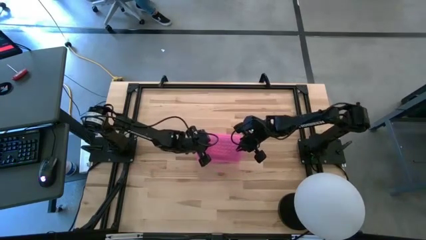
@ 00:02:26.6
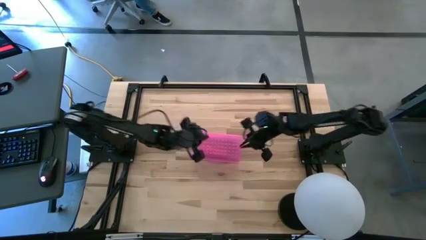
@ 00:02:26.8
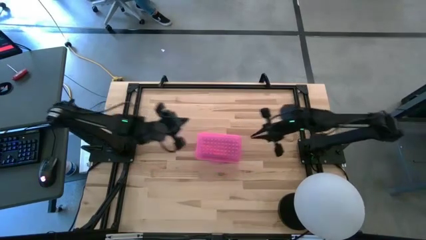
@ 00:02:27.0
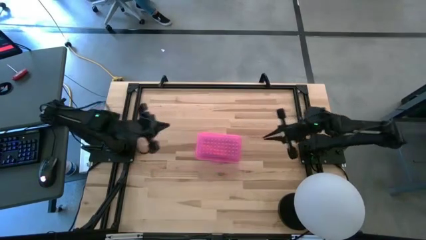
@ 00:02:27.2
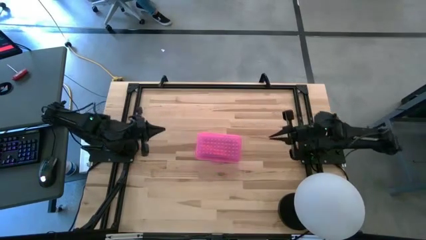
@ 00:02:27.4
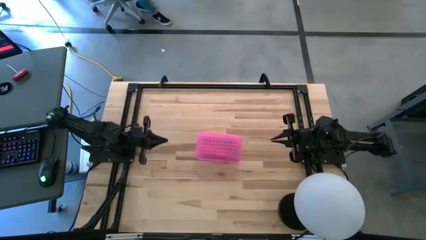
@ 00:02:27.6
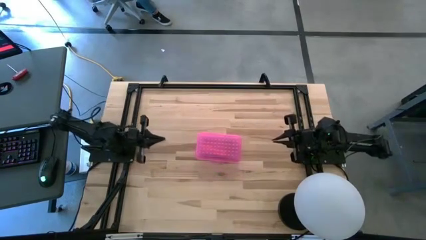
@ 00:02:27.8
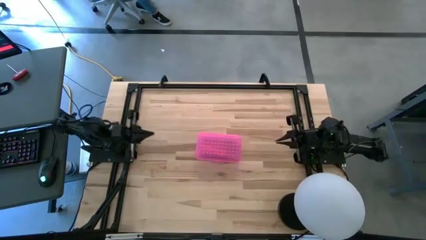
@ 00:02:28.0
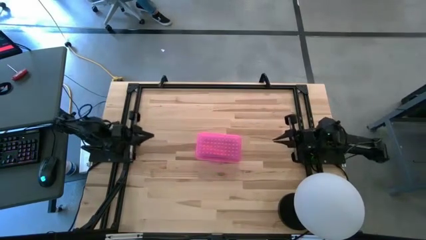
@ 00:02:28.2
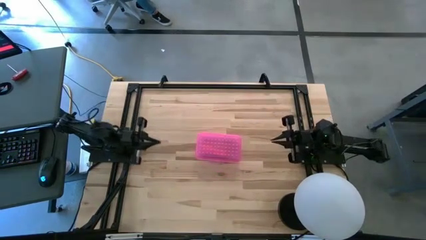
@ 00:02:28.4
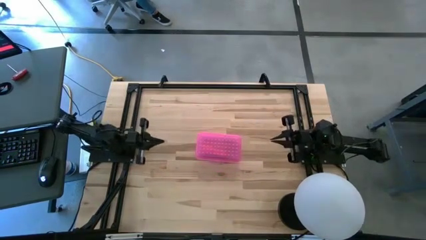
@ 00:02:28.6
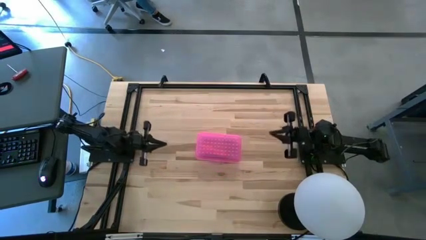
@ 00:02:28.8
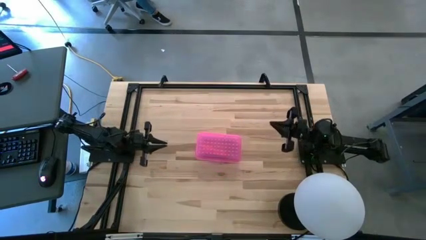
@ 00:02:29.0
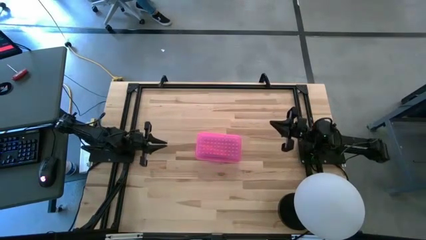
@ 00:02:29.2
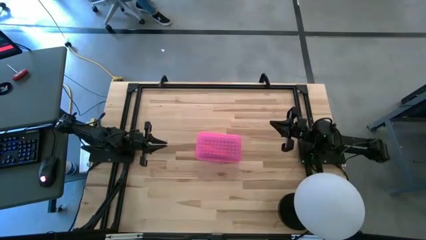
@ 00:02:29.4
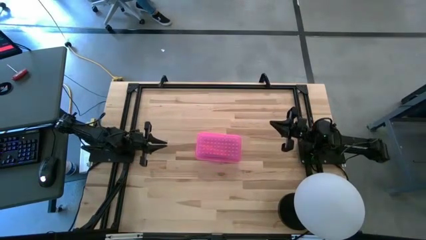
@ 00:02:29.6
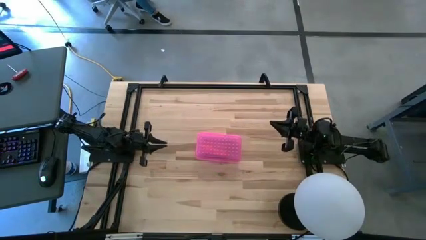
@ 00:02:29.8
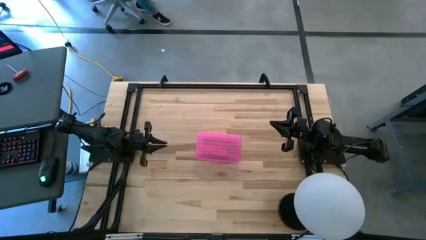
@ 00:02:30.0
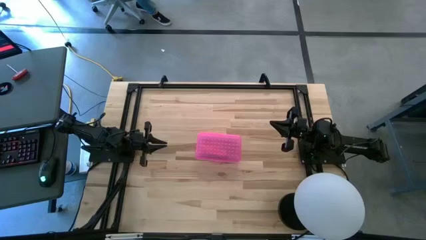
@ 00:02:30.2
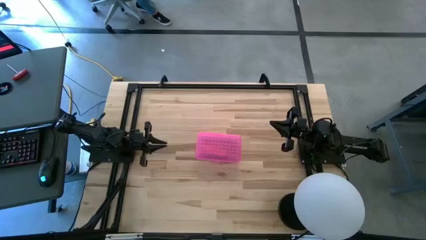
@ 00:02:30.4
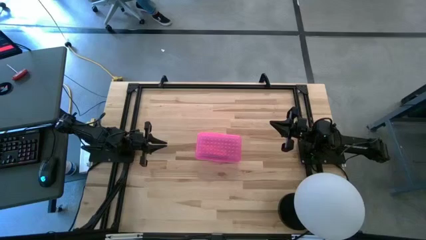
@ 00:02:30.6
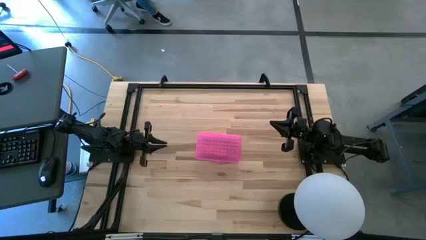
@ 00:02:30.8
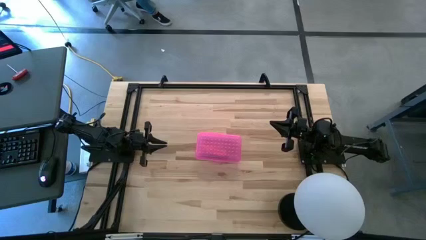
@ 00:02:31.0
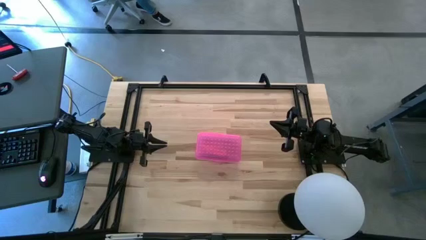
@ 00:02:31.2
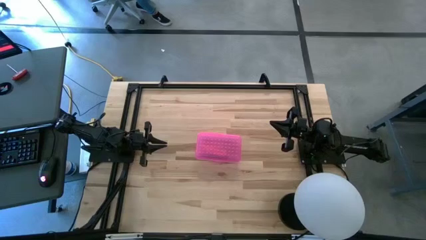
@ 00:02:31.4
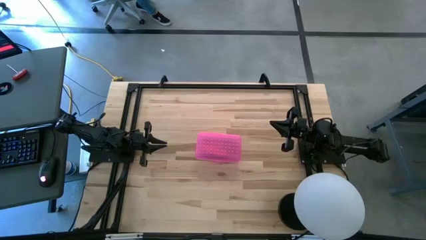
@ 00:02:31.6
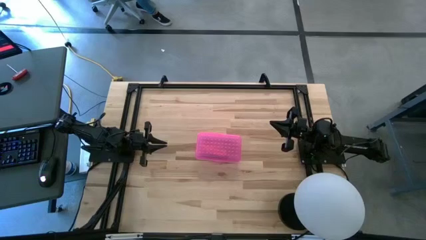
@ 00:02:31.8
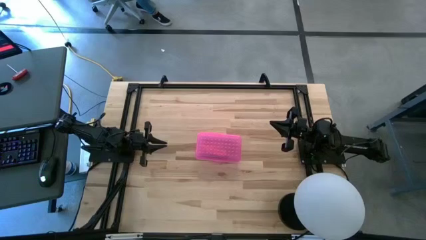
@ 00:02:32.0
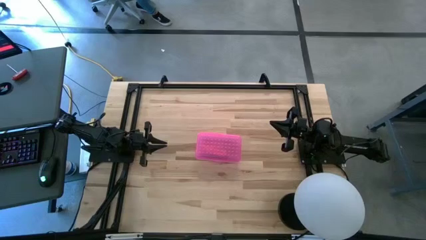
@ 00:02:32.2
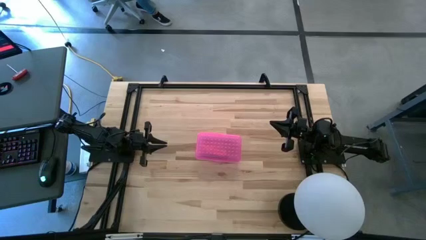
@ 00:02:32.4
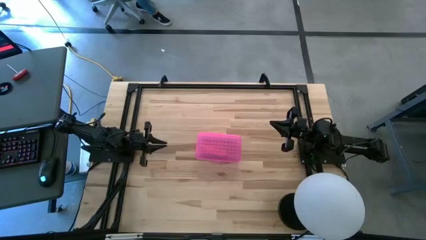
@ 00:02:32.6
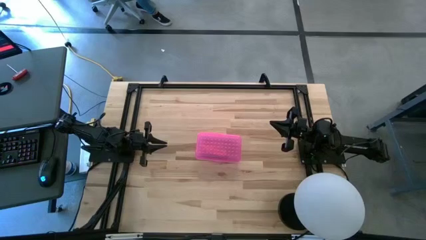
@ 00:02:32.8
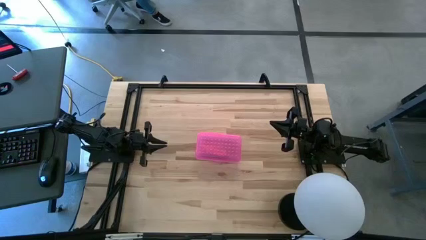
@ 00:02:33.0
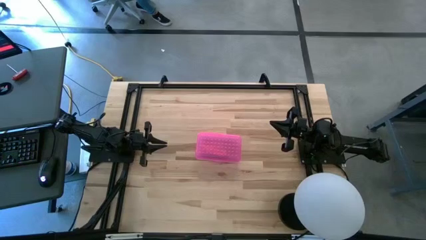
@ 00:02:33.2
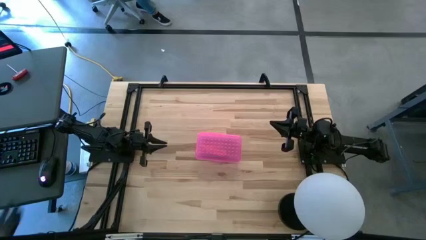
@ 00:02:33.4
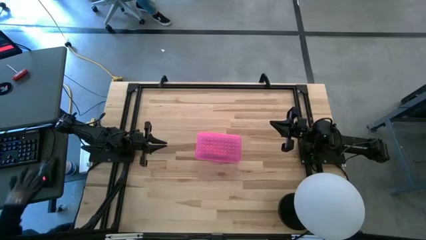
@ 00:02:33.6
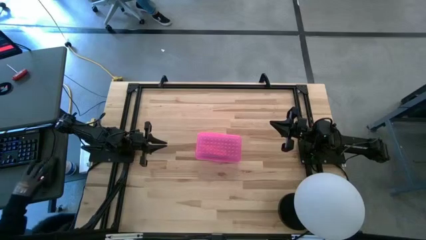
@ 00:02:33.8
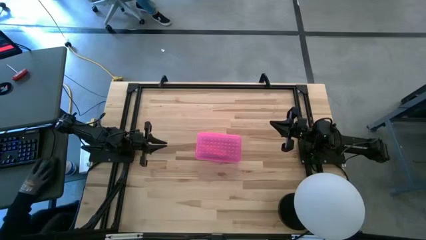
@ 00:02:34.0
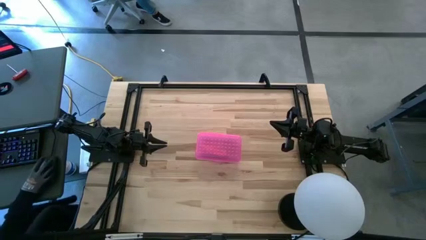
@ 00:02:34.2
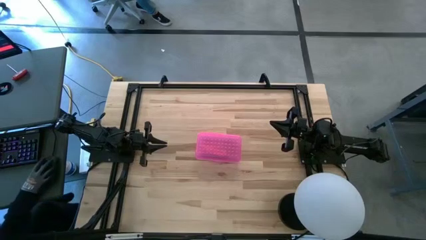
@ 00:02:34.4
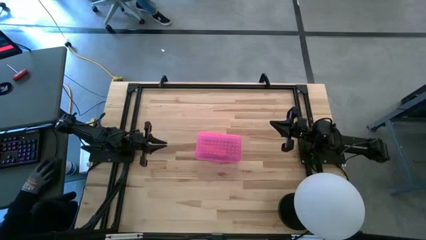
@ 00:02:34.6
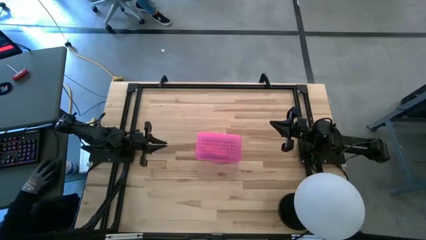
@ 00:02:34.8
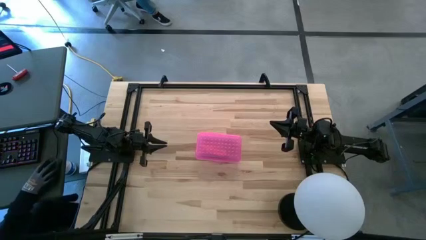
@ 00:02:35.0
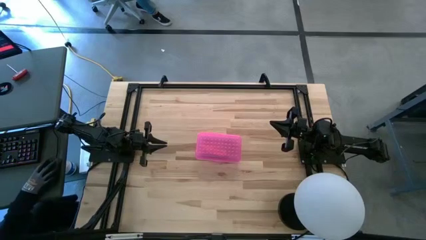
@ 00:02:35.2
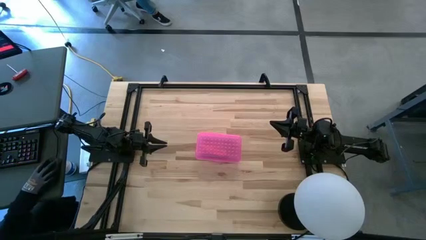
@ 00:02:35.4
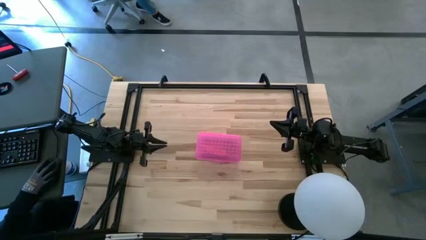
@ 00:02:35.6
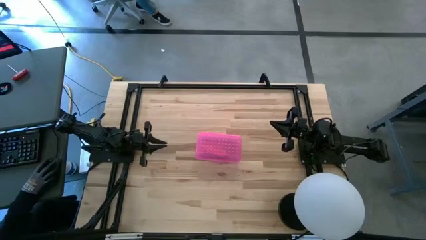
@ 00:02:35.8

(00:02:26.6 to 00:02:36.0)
Task: Pick & place school supplies into a supply box
Return to Home Position

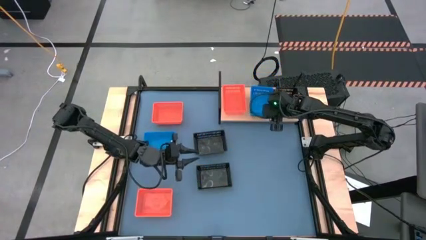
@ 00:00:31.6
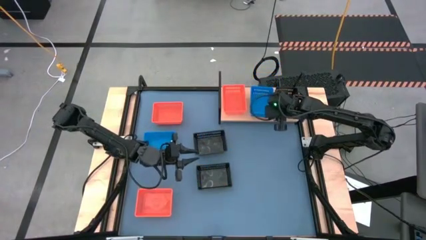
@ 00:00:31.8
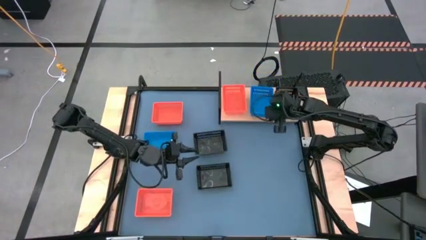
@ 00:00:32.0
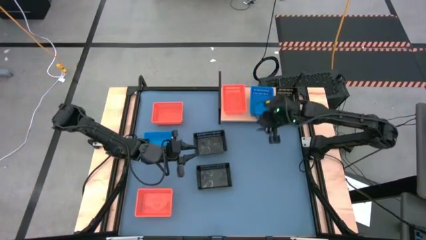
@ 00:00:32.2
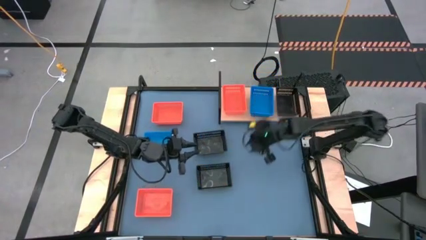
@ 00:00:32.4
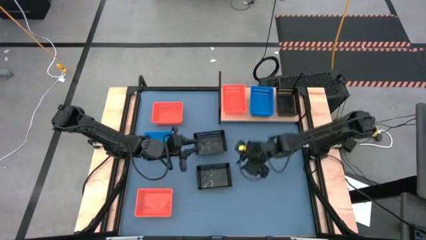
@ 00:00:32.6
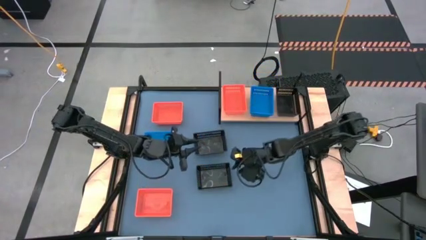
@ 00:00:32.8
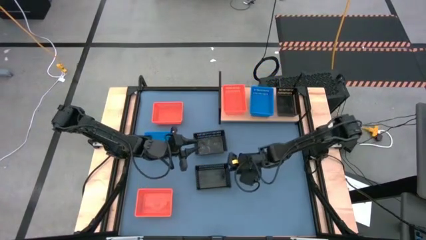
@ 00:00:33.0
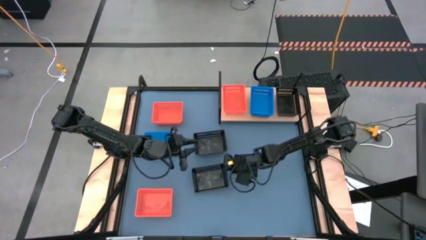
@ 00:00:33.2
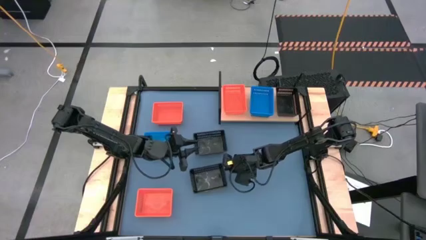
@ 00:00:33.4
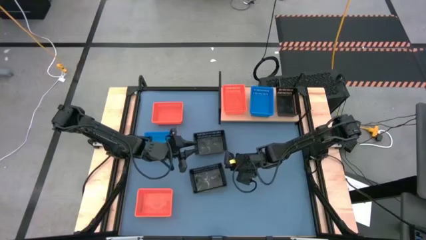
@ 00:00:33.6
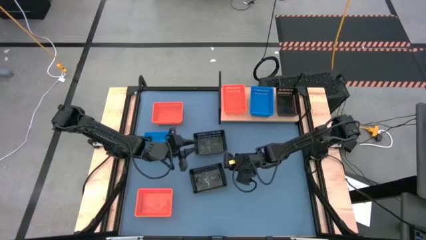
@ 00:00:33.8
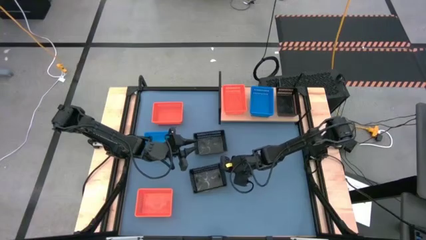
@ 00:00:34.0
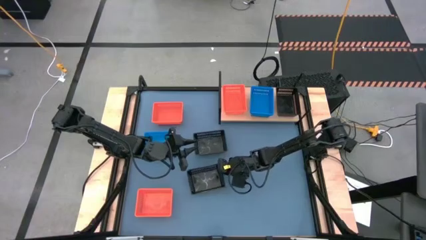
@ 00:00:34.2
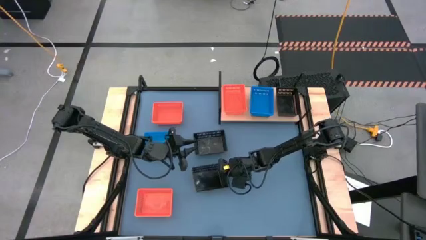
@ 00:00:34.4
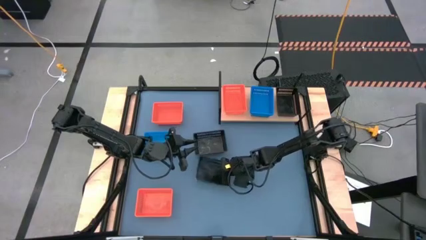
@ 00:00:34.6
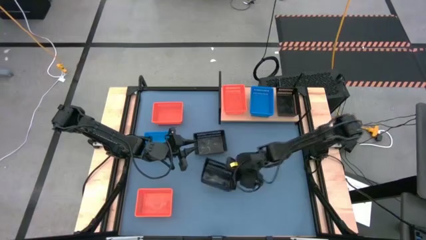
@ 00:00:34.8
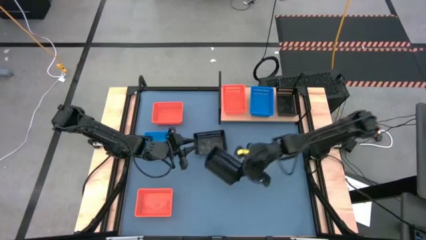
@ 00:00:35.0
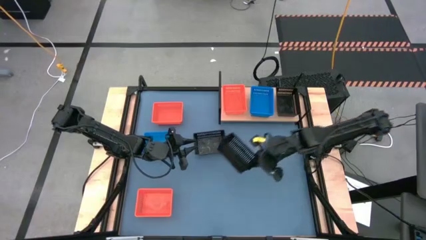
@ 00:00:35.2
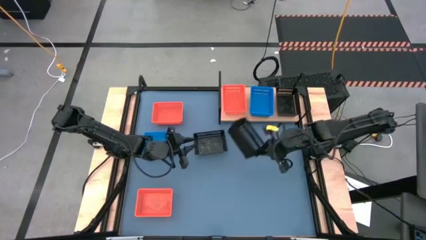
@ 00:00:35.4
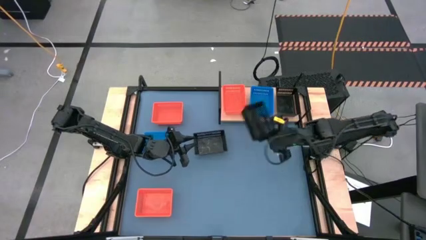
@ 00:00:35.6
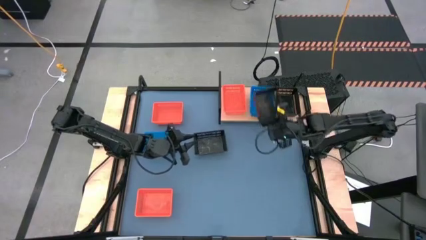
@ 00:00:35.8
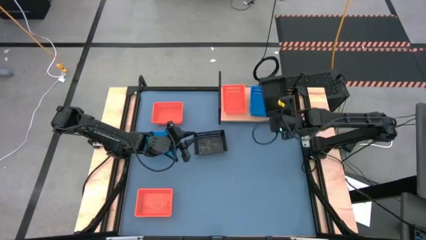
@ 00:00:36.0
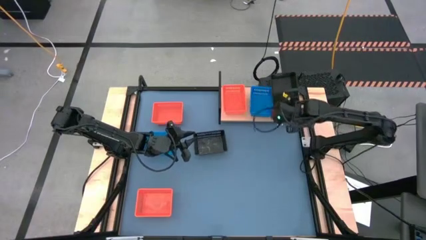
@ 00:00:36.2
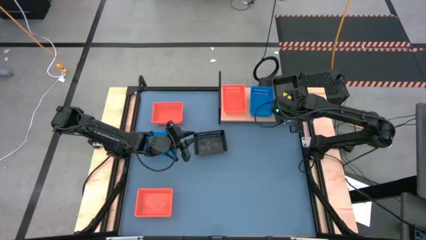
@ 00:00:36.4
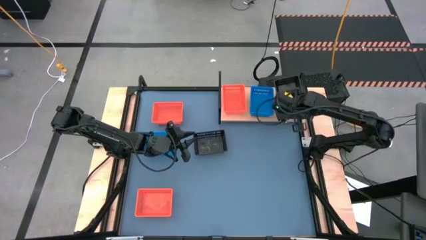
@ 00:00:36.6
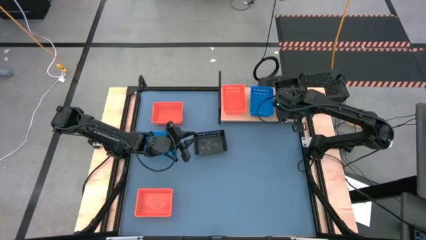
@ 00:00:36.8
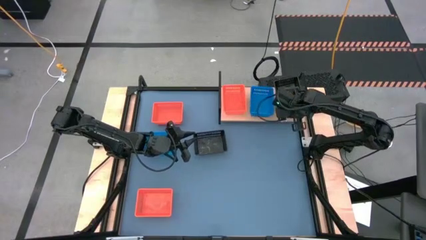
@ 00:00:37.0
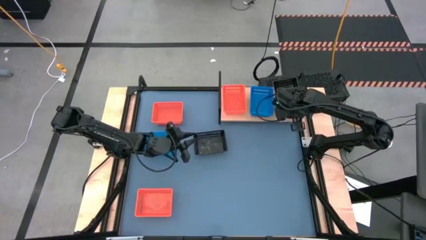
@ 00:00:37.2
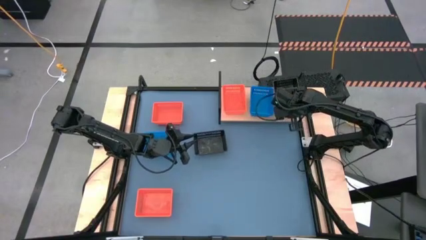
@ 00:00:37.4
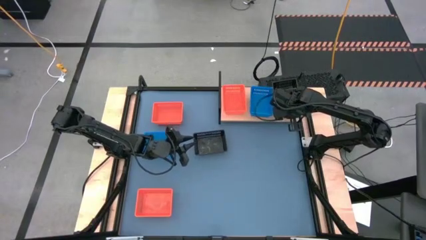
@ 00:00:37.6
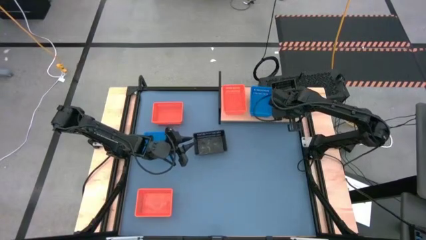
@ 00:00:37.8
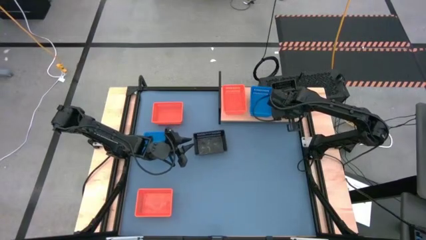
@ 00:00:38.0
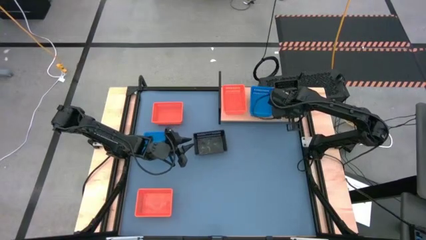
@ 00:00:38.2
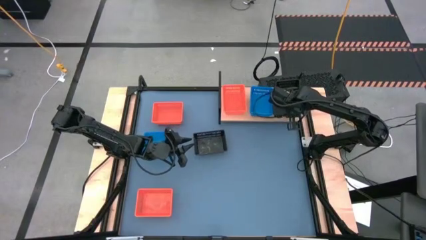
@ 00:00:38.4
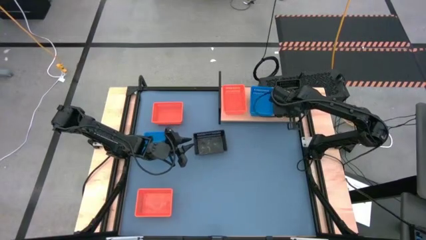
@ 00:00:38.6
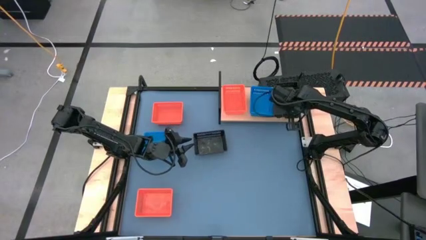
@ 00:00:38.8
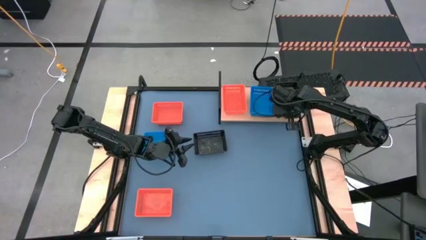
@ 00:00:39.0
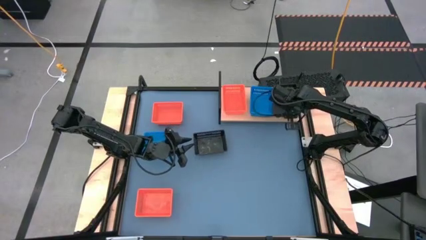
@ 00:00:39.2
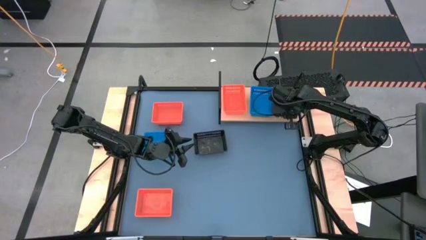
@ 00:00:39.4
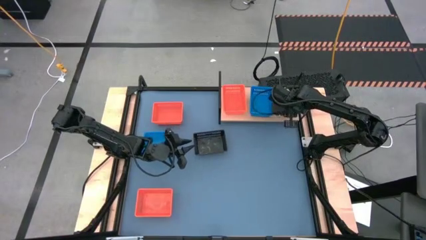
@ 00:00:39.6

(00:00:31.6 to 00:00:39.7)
Task: Stack baskets on shelf by color
Put the bottom black basket on the shelf
